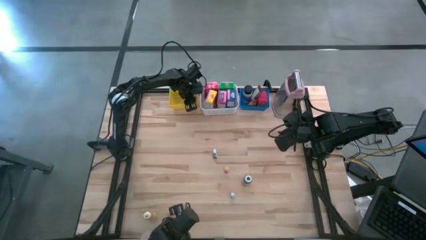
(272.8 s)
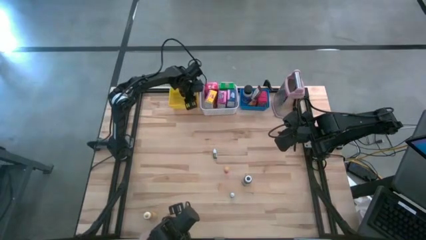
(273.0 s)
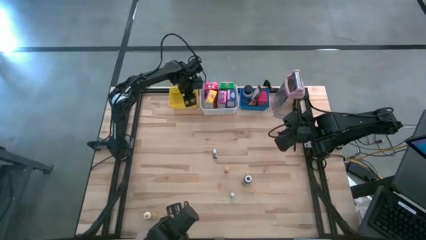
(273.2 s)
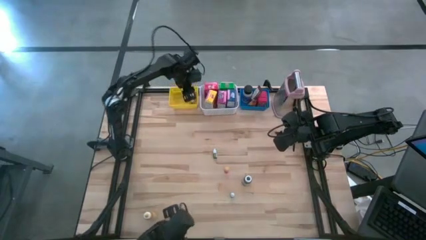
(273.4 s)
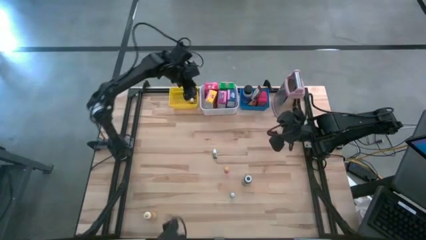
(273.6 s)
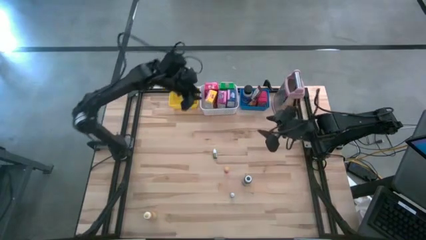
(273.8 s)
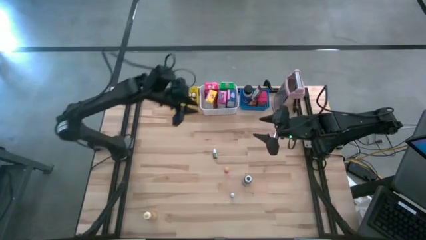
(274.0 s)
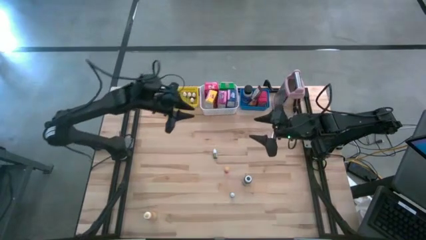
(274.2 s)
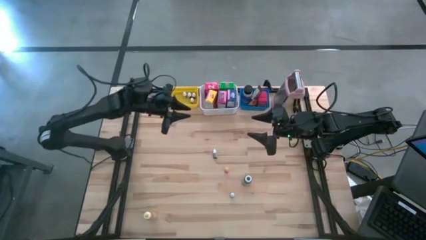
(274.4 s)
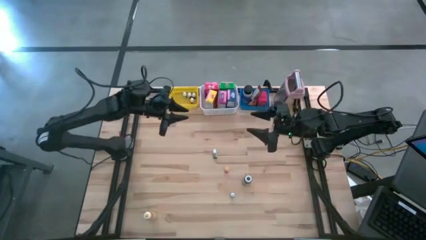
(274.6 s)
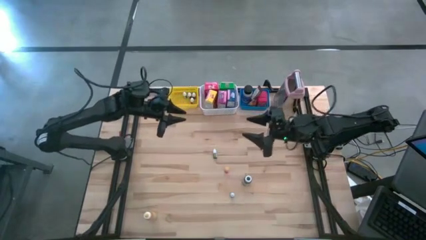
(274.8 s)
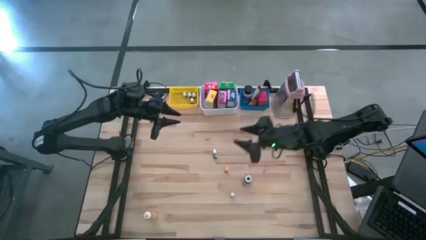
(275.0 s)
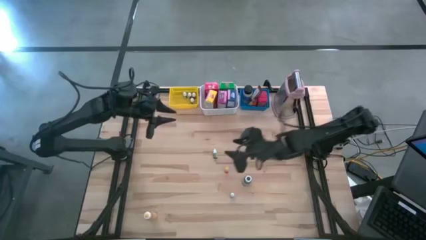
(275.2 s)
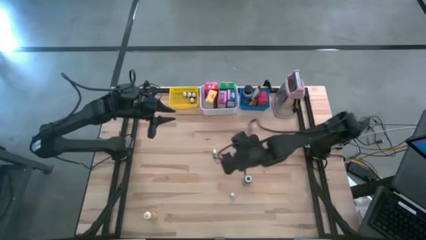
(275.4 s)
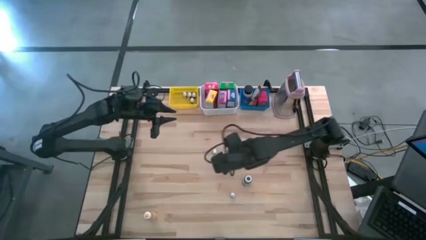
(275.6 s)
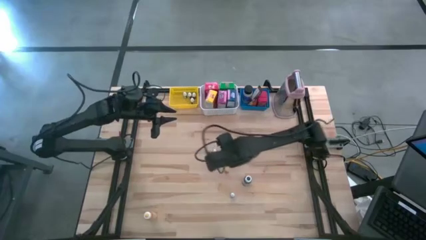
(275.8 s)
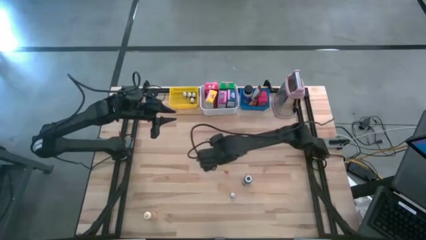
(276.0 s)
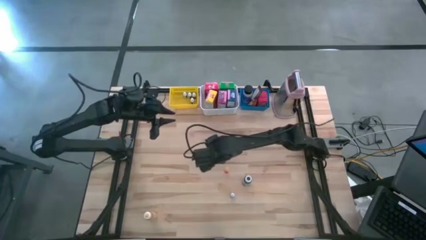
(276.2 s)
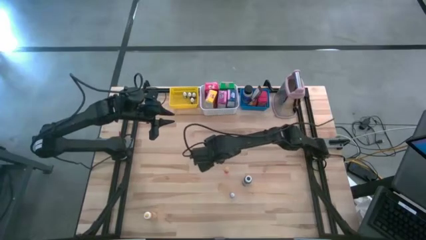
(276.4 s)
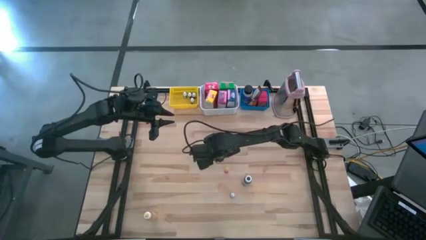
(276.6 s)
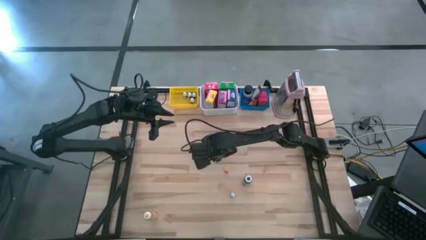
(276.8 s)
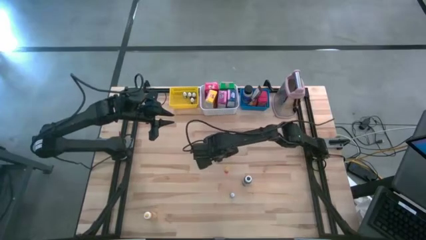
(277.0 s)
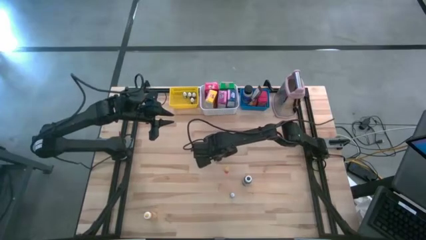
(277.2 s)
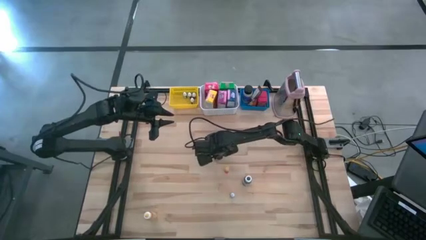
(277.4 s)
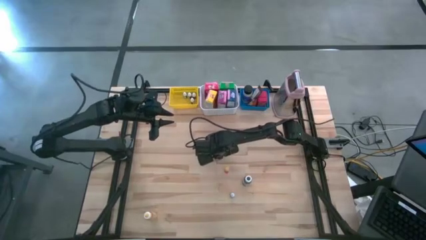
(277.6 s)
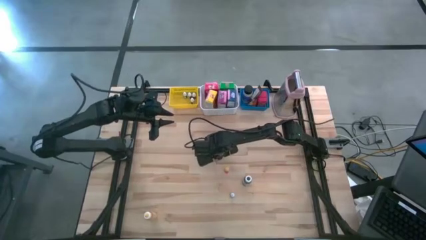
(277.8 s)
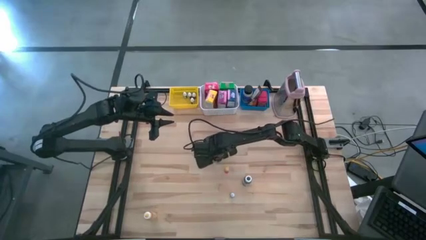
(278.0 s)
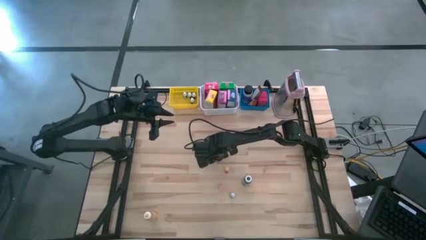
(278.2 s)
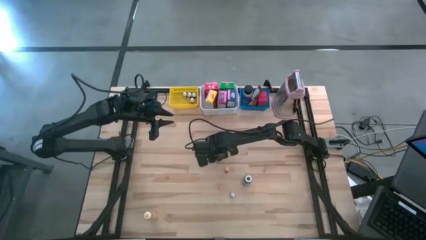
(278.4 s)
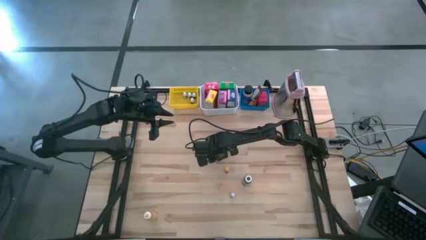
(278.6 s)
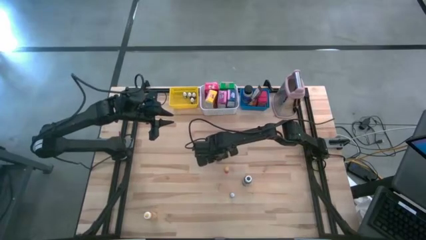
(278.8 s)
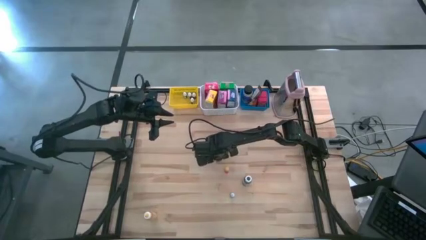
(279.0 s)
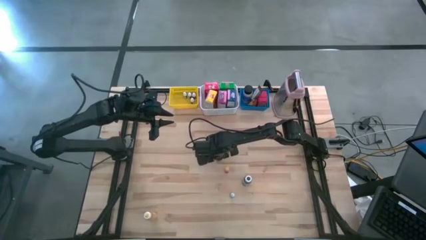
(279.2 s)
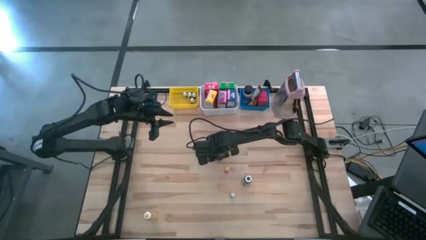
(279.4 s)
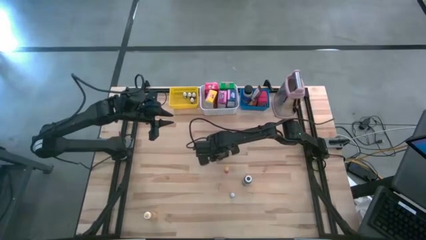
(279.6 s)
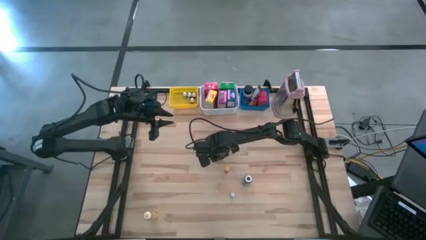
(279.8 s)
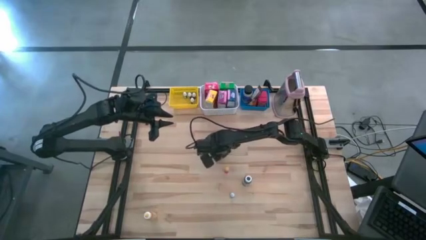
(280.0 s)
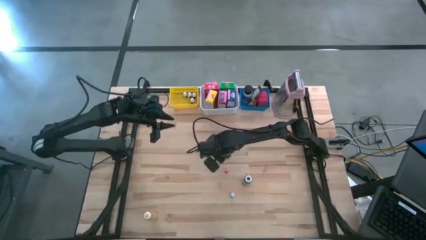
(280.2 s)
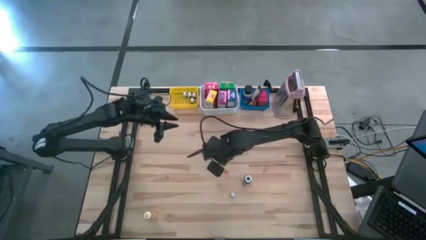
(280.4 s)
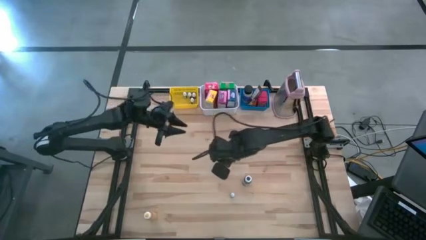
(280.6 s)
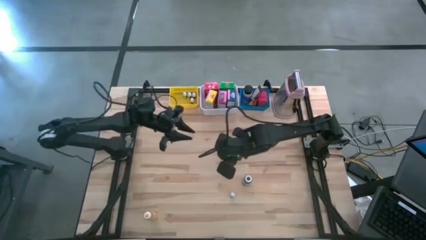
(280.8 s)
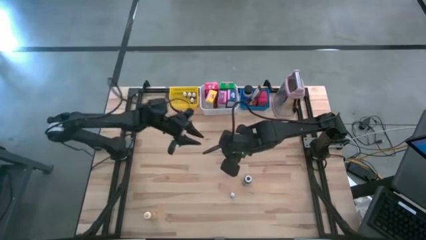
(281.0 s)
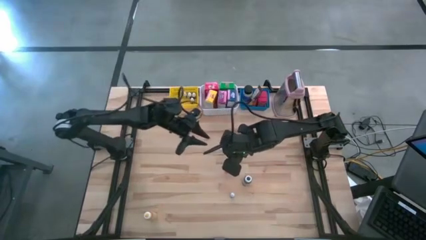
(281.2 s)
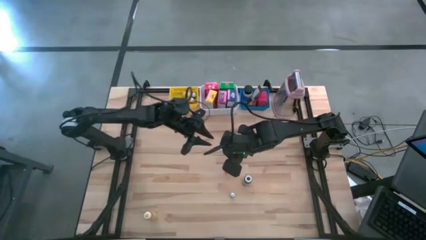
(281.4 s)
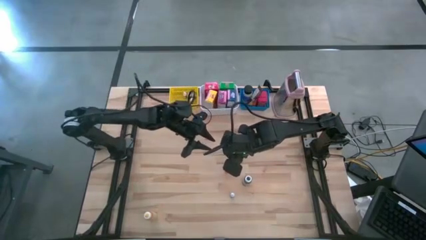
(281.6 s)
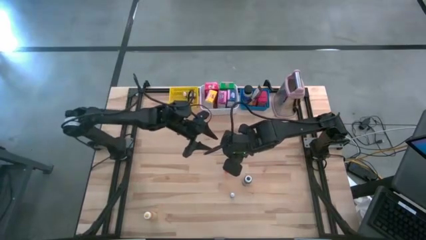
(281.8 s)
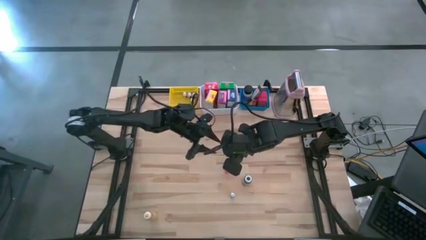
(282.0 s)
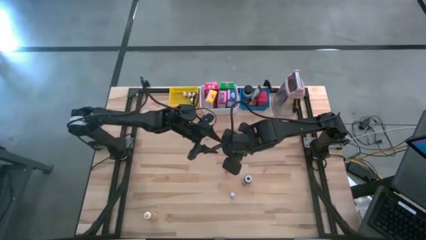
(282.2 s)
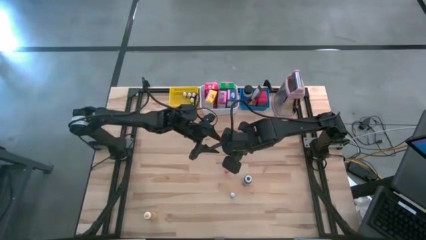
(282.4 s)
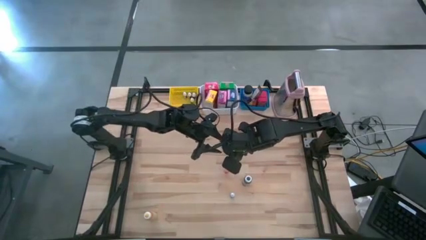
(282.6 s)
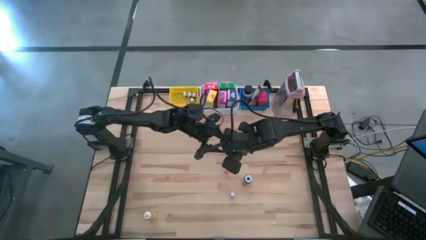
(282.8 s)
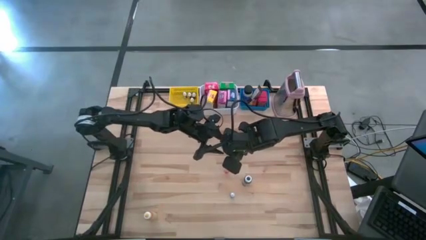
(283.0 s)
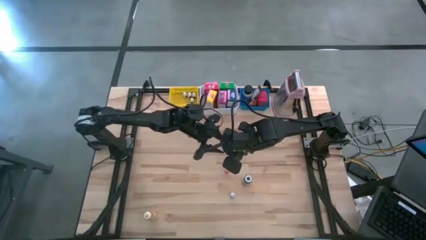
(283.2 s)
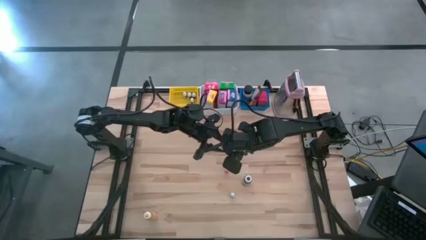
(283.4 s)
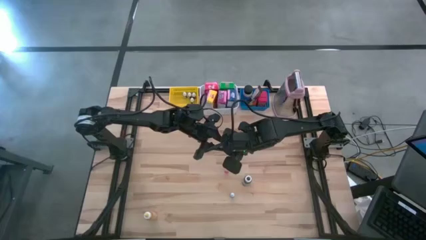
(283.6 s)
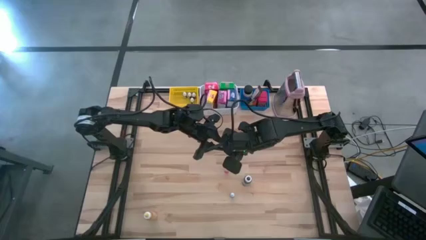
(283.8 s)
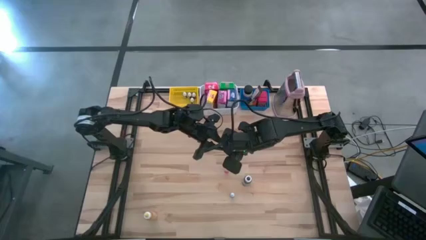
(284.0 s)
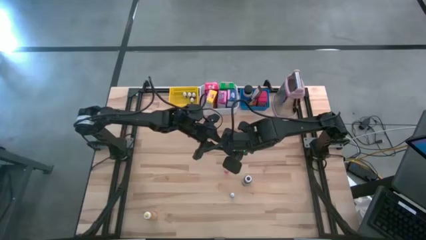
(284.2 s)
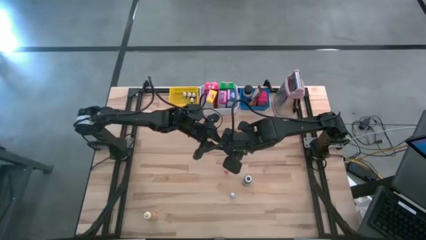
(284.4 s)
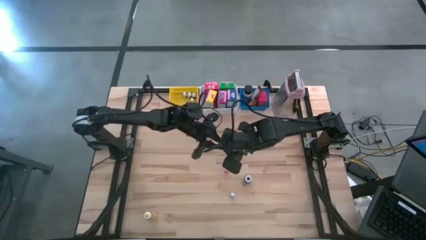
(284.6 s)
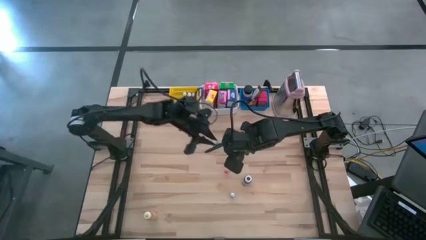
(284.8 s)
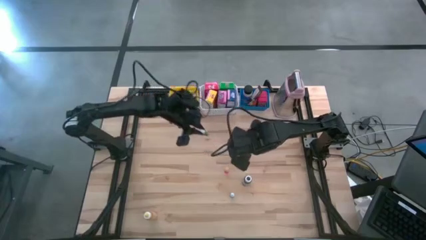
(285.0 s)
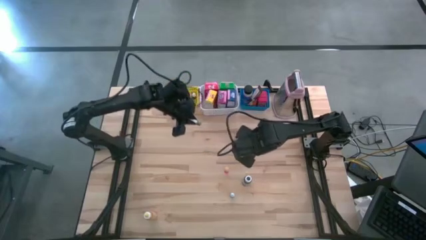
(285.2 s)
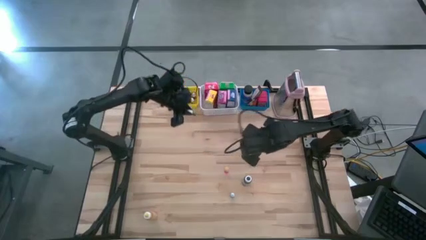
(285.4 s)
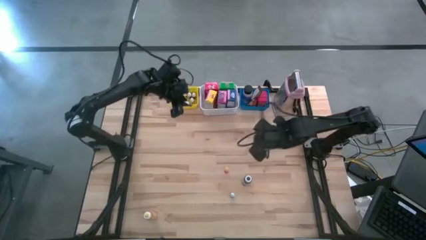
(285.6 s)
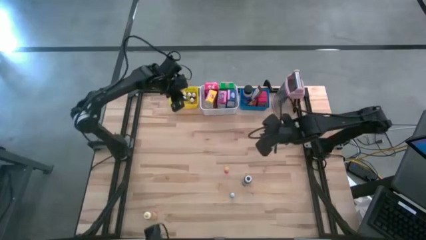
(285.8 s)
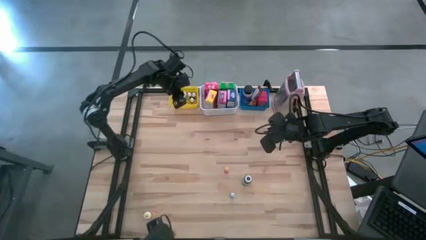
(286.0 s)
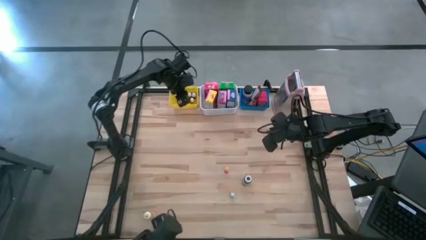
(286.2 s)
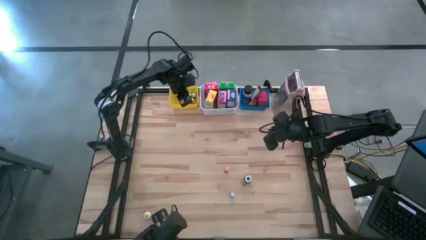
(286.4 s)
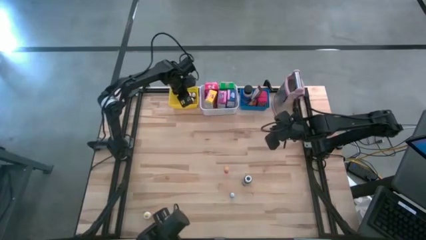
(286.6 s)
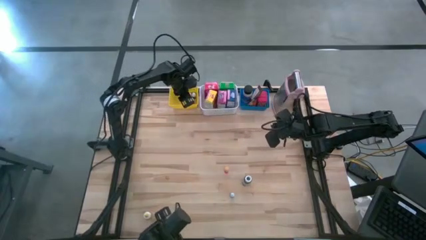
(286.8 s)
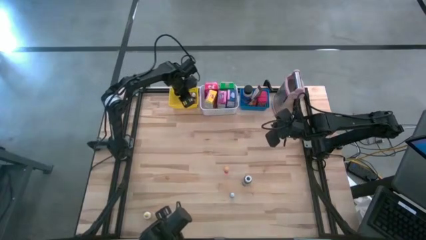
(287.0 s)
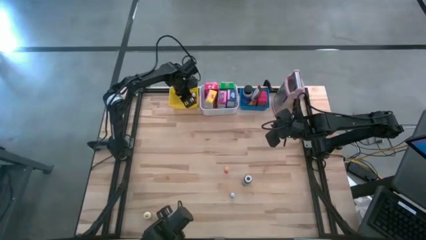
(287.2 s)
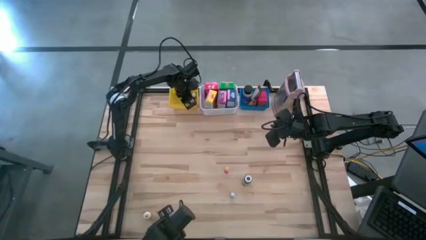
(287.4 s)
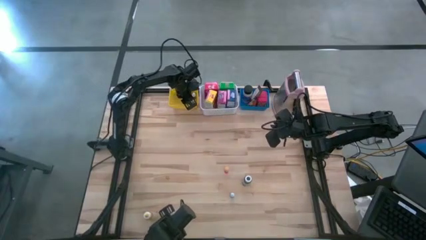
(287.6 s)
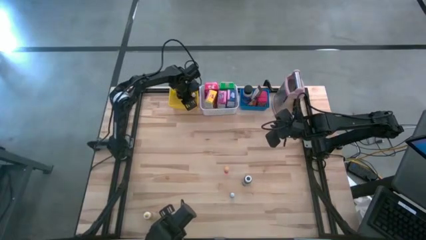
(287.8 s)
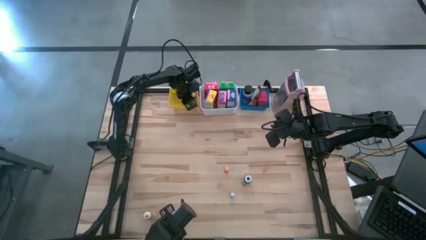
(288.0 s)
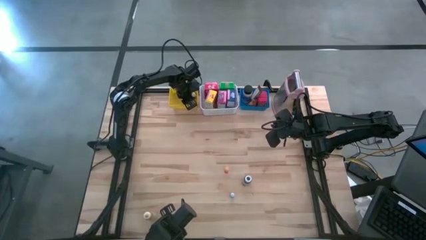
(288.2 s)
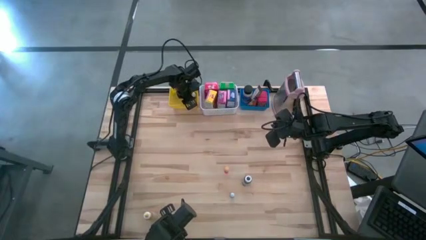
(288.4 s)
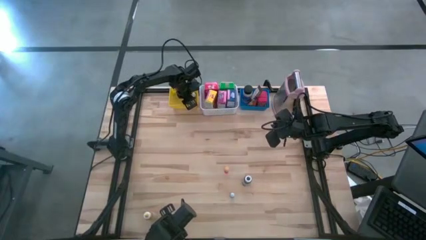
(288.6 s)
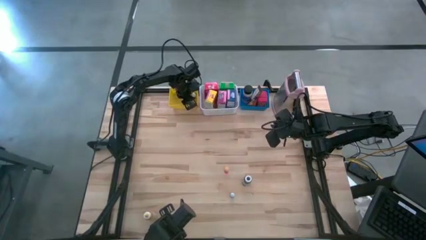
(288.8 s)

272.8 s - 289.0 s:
Task: Pick & Place Kitchen Items
Put the green food coloring bottle into the yellow basket
